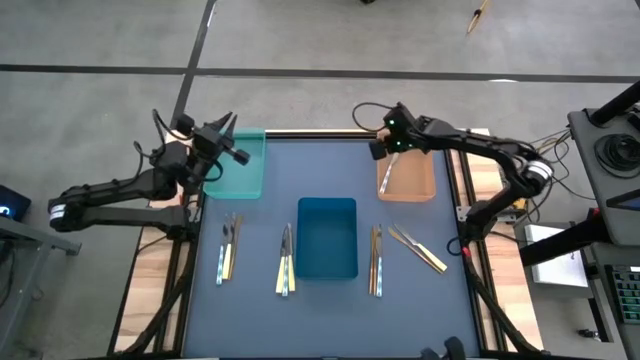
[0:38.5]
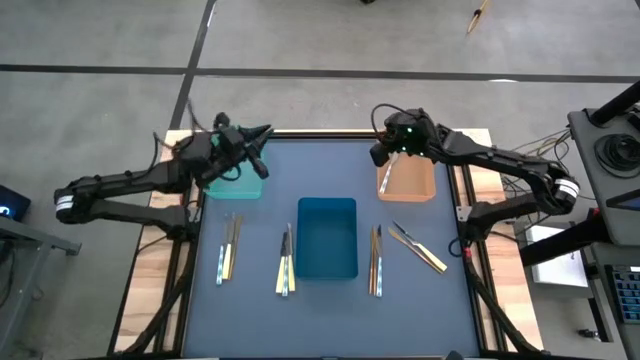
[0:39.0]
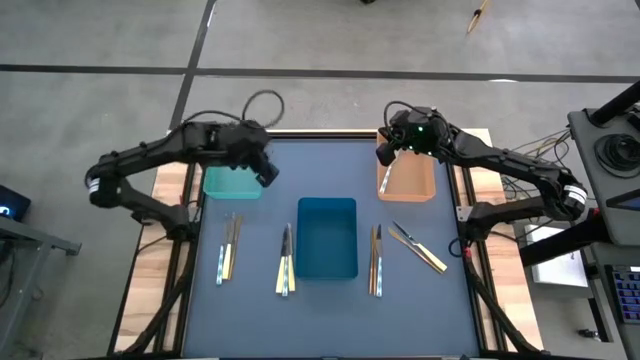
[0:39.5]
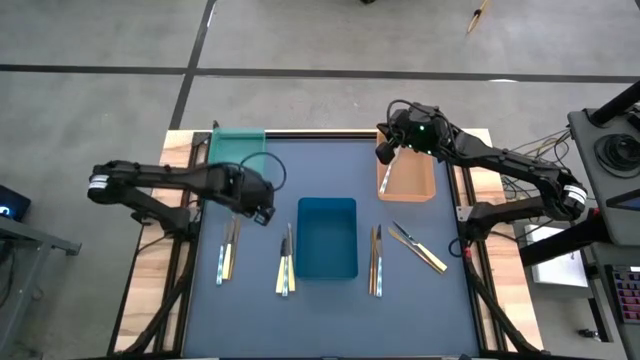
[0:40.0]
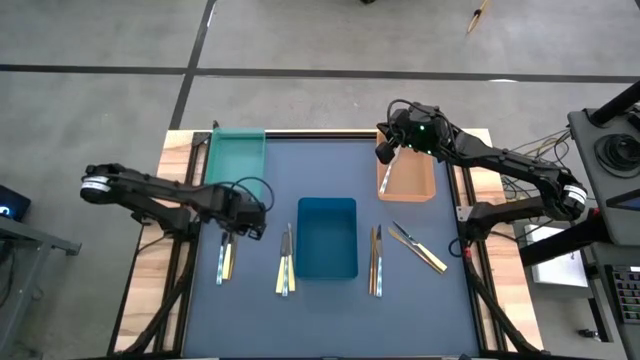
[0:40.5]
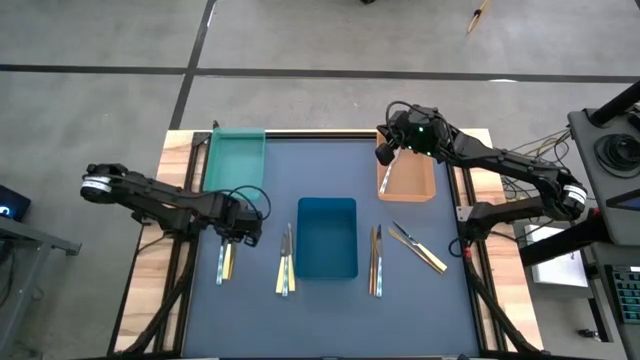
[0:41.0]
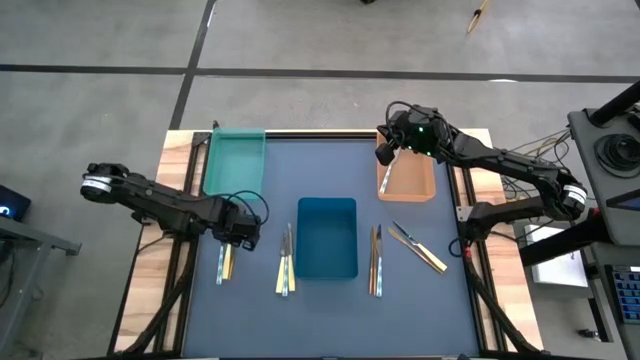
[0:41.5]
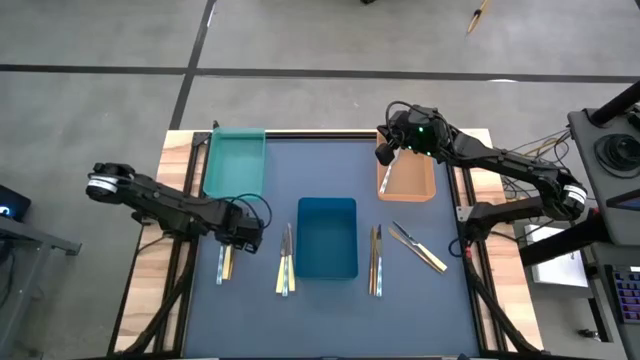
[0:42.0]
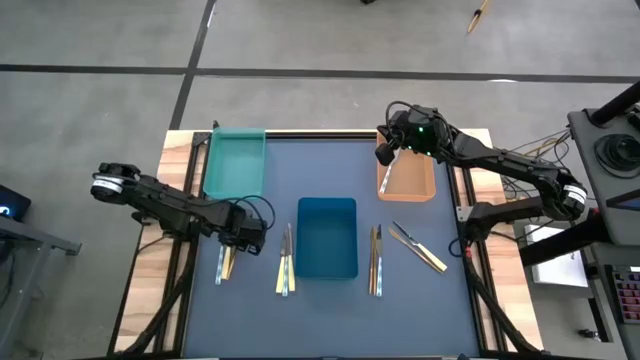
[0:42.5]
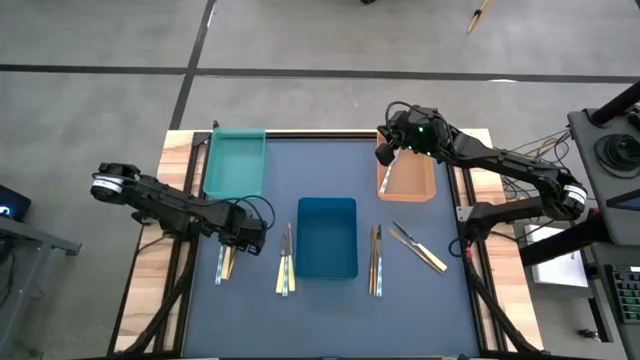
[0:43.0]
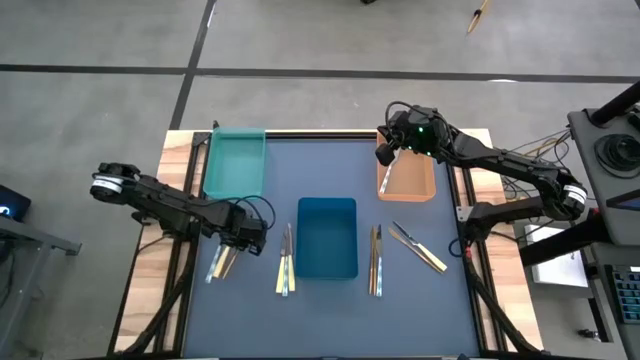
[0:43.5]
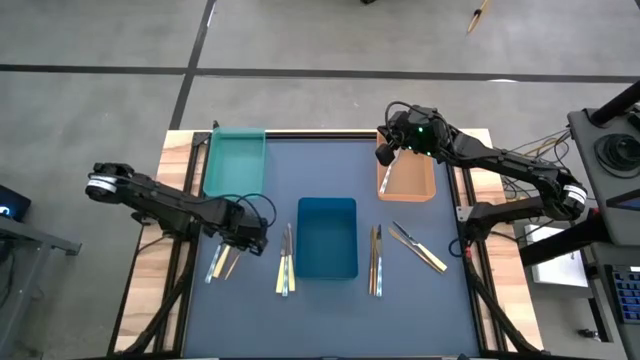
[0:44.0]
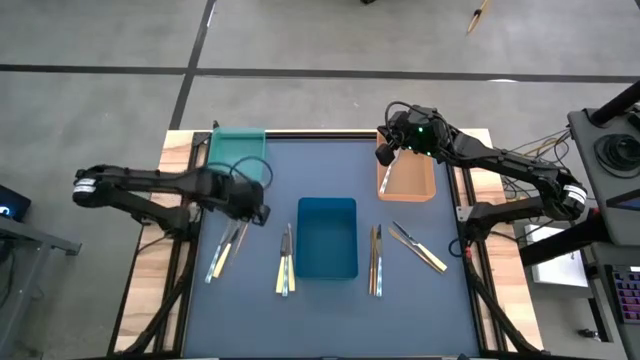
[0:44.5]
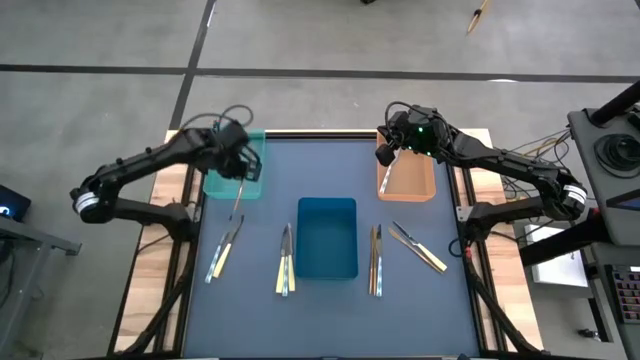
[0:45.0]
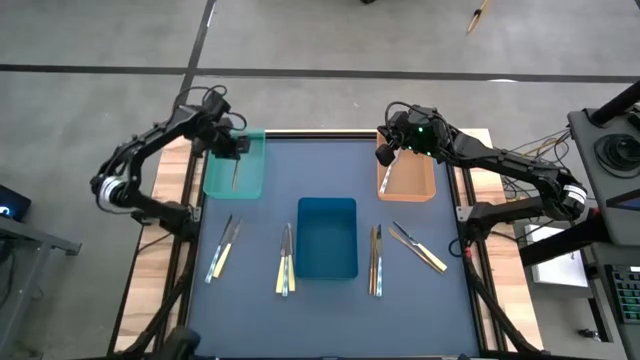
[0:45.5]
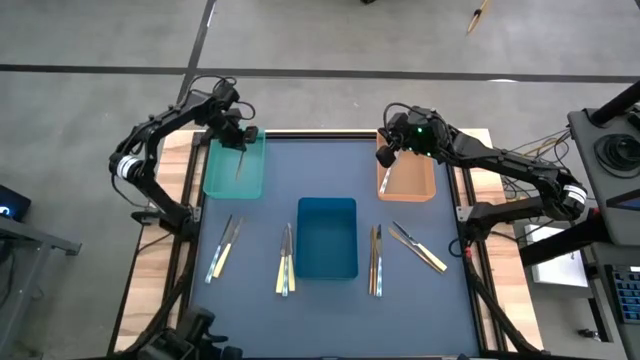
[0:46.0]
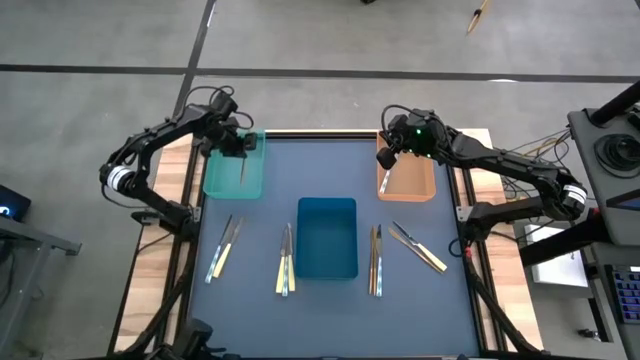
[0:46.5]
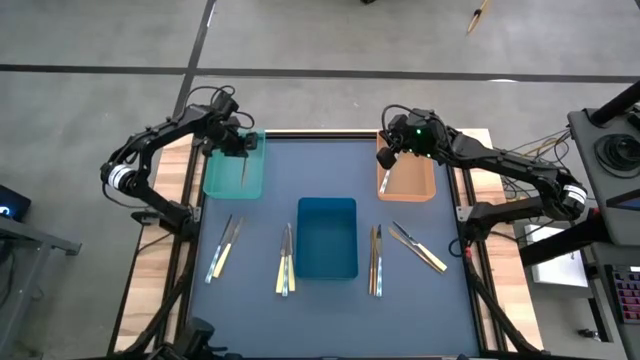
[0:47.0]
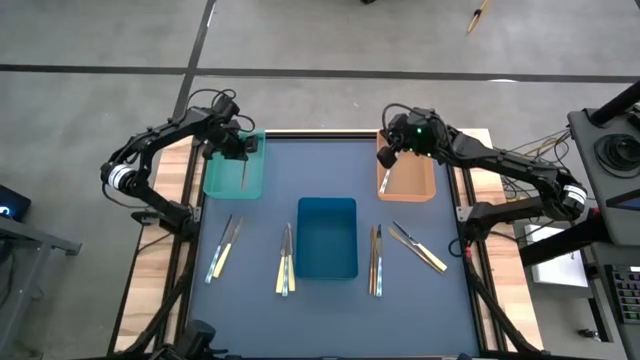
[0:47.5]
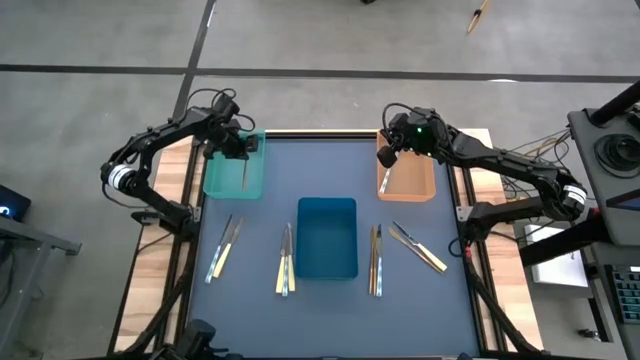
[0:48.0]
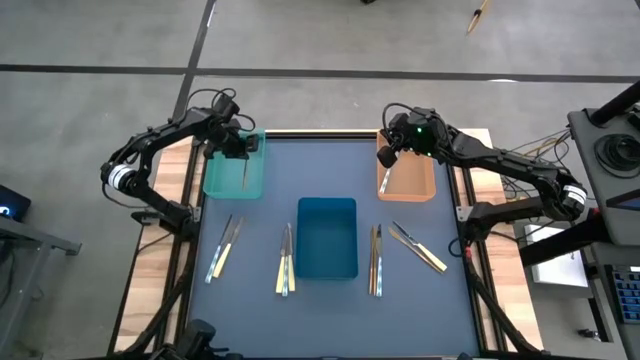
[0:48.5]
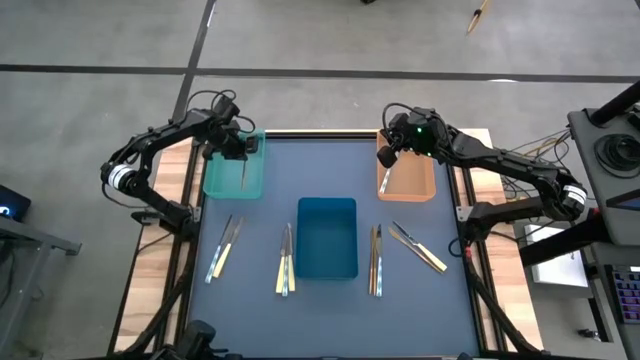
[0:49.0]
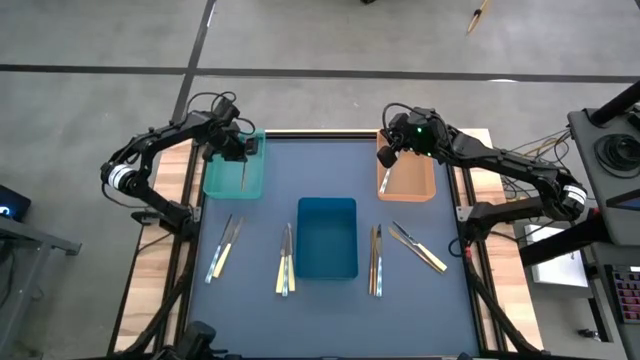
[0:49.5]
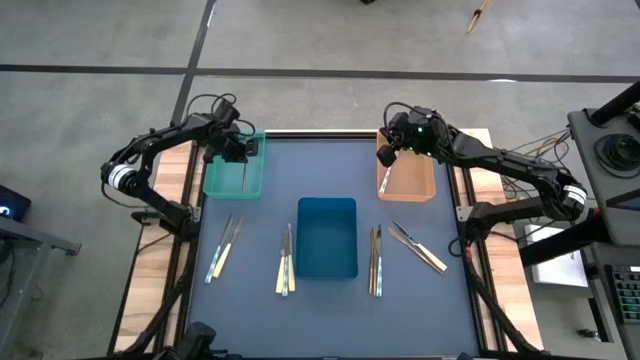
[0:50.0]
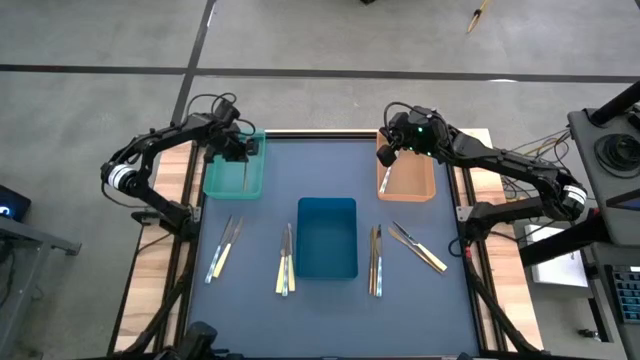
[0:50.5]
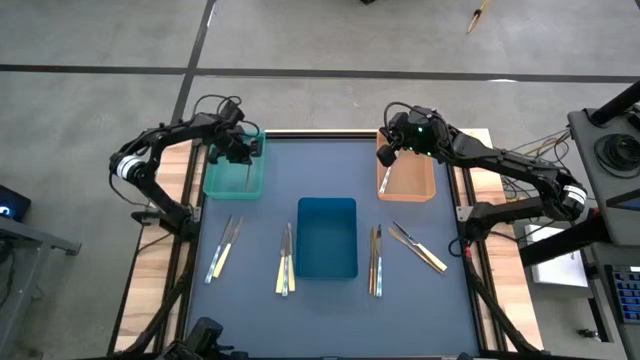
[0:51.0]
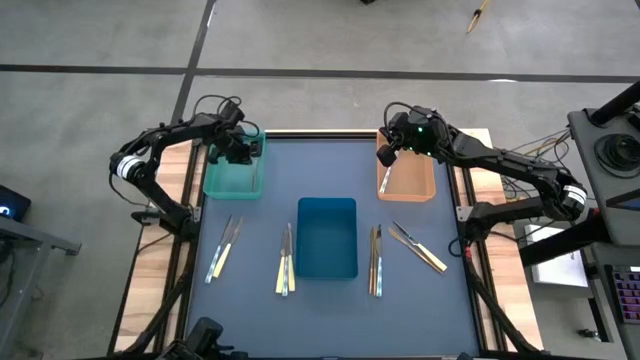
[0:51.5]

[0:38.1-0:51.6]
Task: Sort silverware by color (type)
Put the top left gold knife into the light blue bin

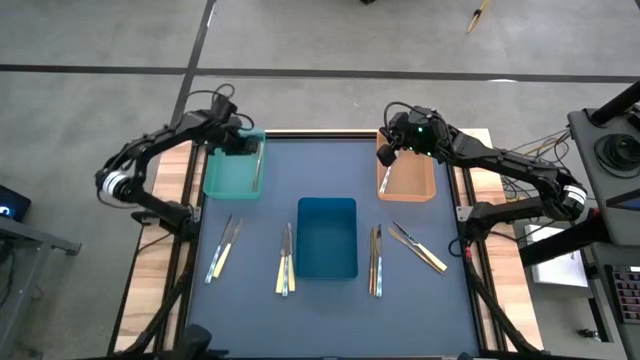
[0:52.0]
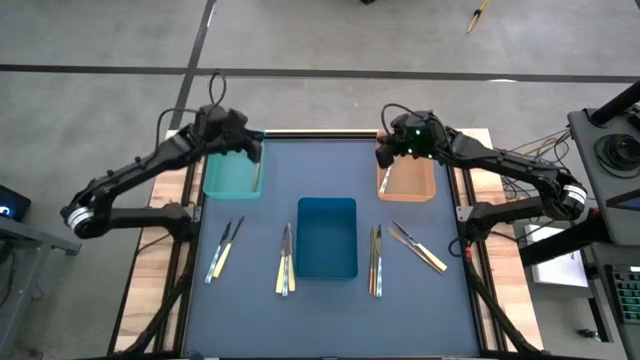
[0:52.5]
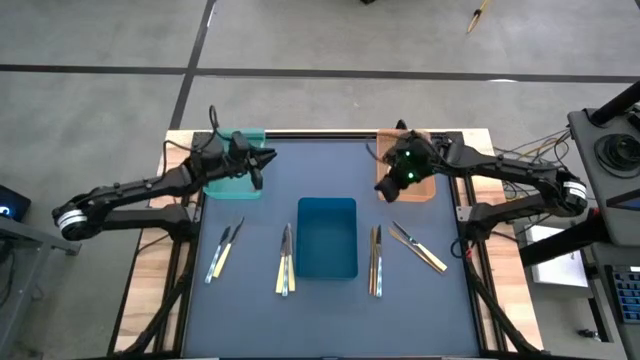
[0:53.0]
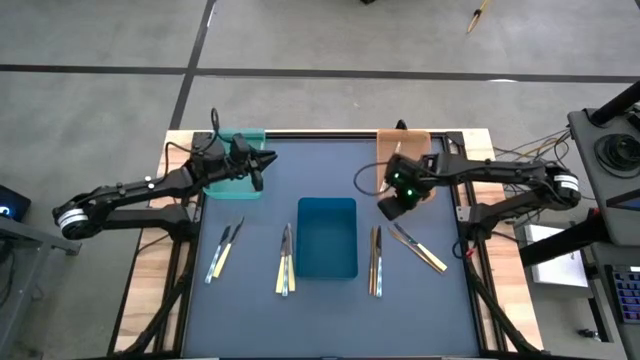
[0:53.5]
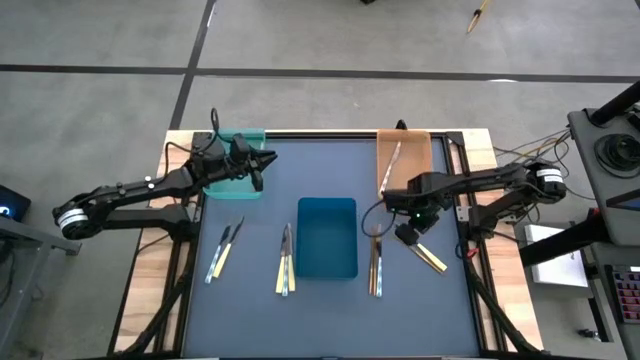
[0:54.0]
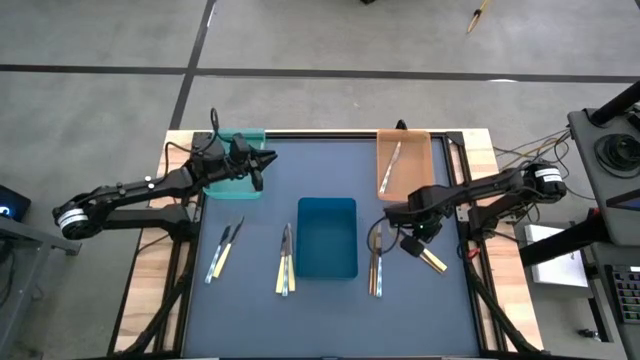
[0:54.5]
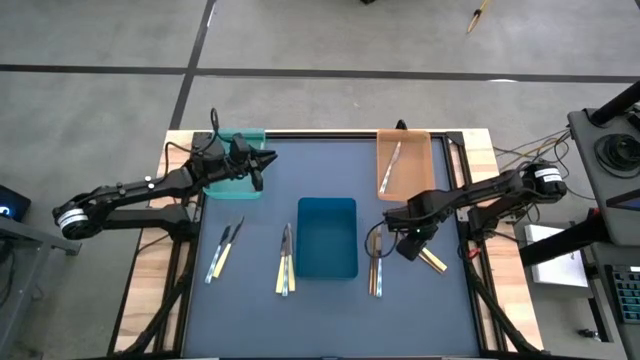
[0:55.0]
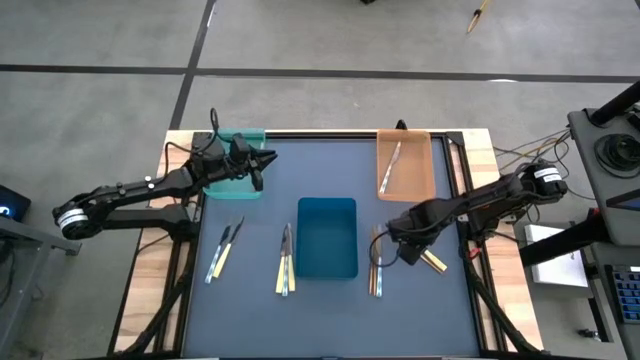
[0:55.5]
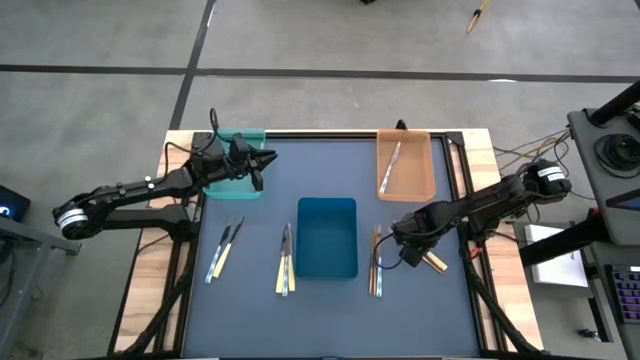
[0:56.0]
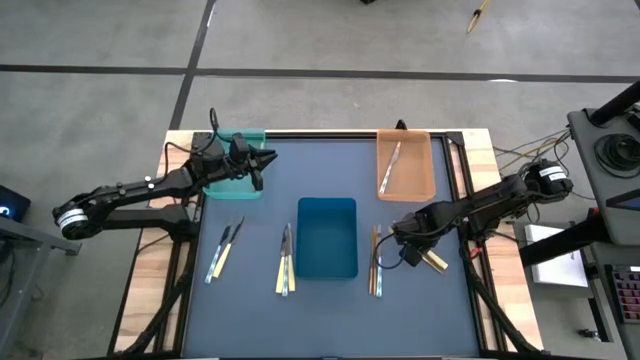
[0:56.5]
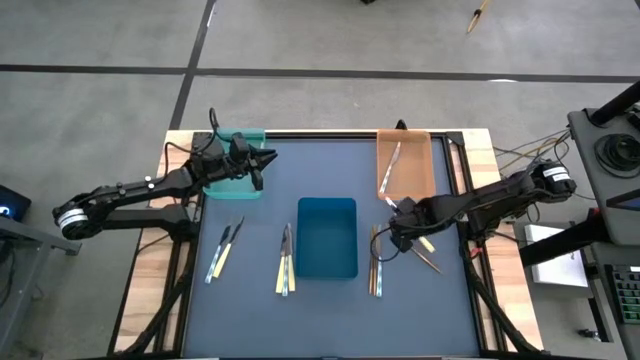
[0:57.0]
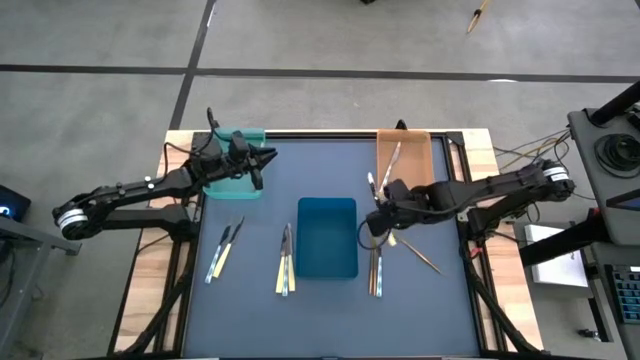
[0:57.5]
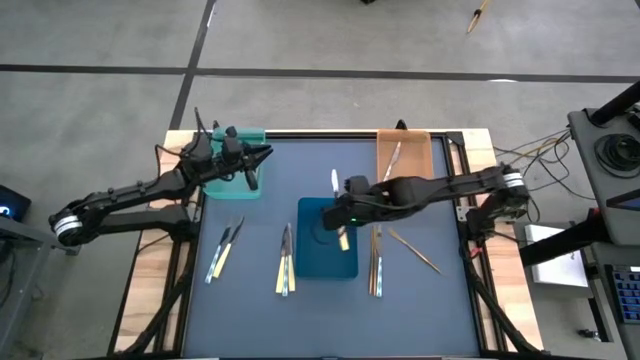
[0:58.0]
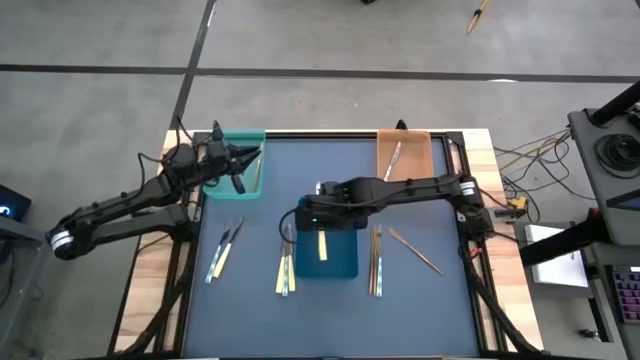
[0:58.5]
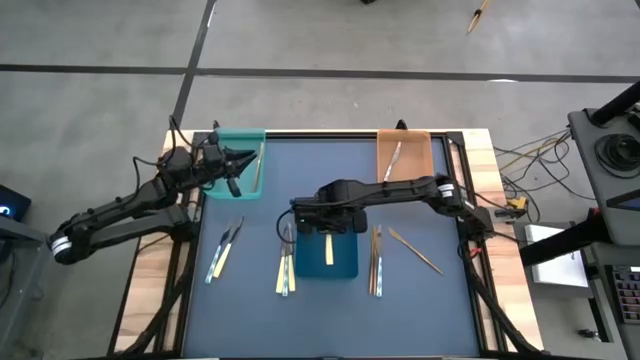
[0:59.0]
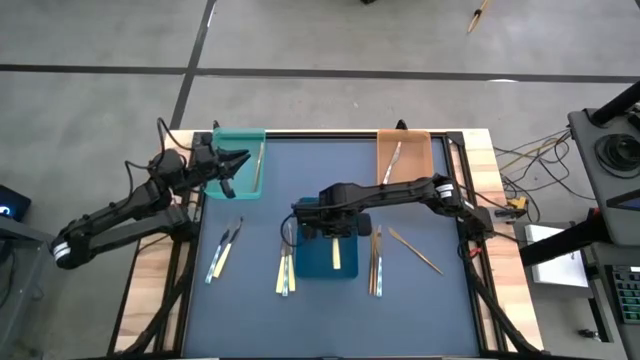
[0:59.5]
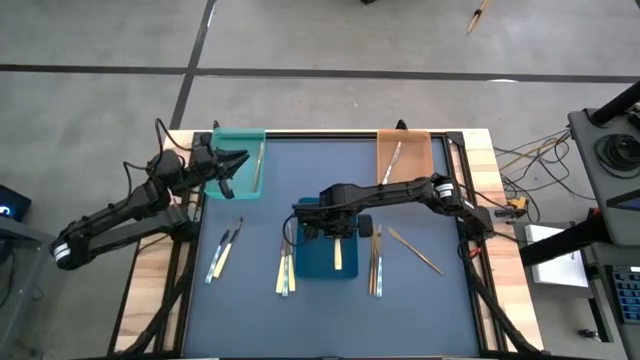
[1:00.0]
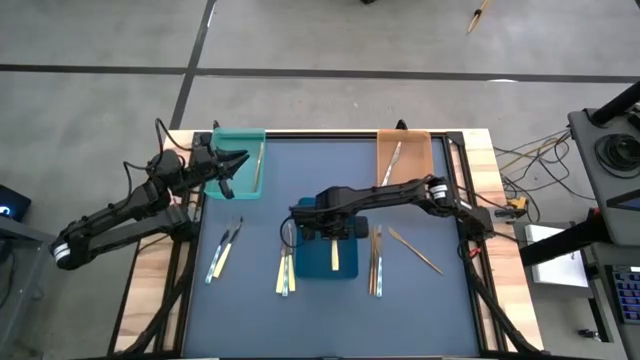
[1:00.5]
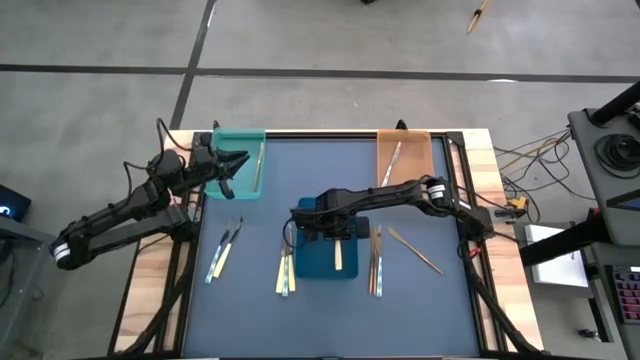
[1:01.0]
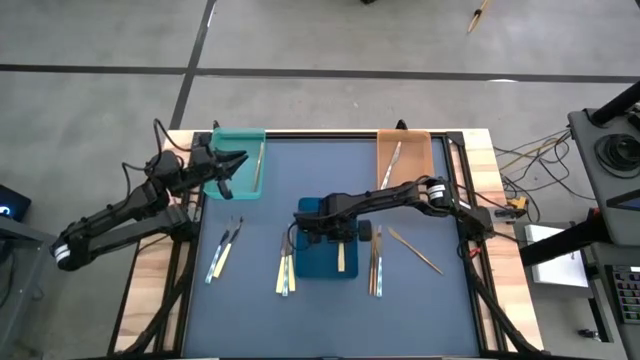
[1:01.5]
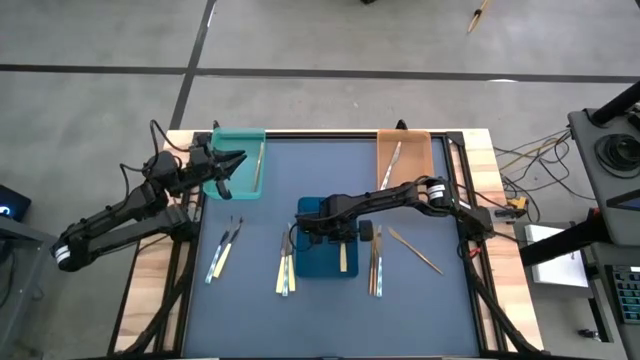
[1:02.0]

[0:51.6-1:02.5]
Put the top right yellow knife into the blue bin
